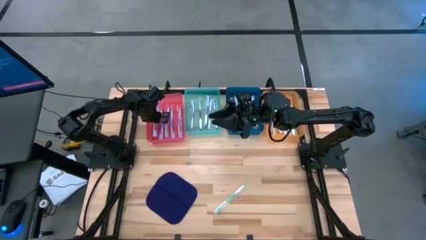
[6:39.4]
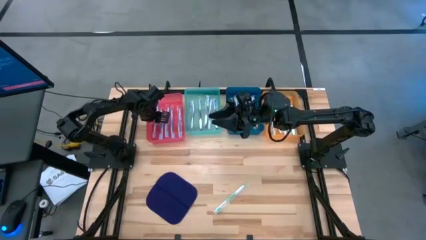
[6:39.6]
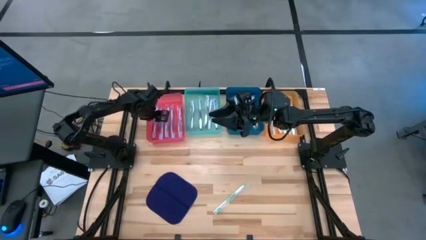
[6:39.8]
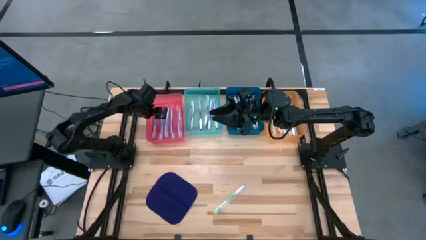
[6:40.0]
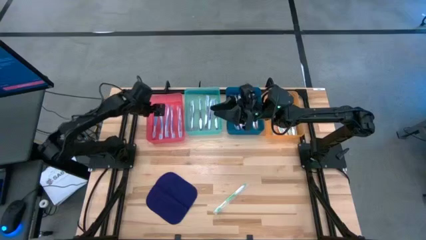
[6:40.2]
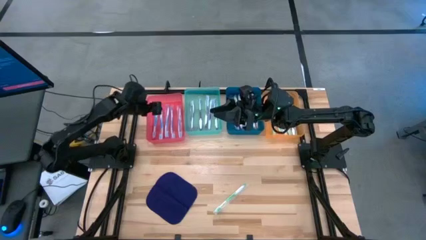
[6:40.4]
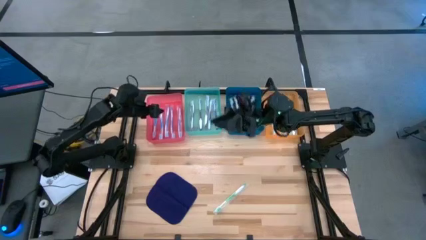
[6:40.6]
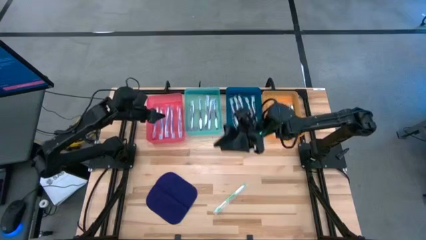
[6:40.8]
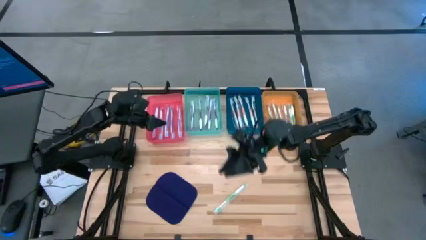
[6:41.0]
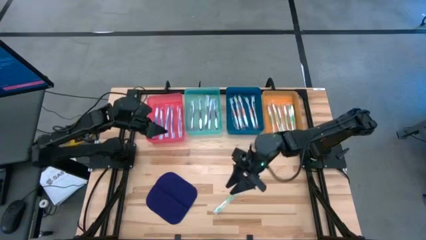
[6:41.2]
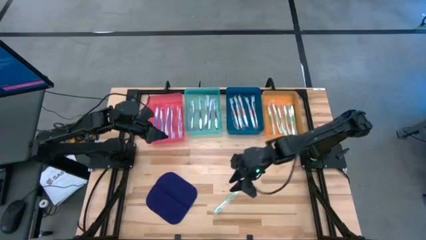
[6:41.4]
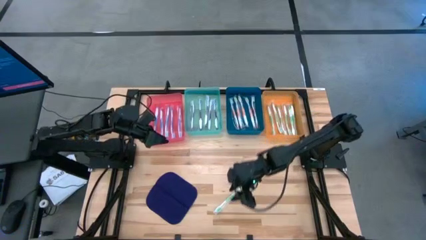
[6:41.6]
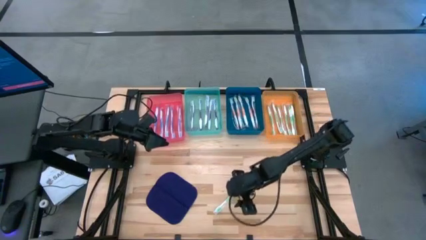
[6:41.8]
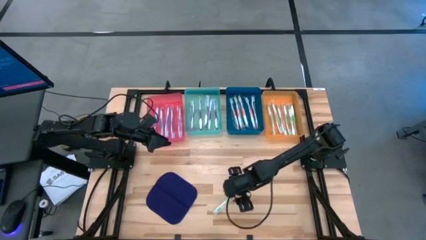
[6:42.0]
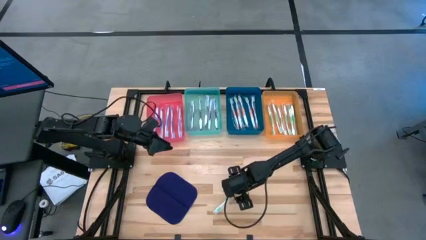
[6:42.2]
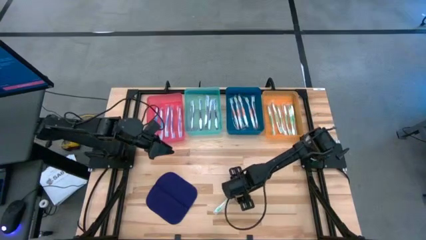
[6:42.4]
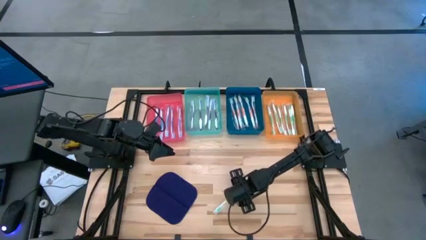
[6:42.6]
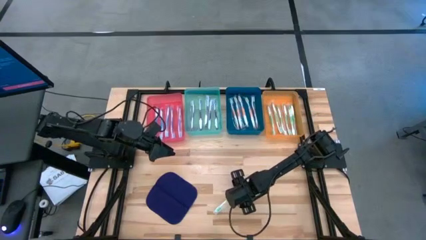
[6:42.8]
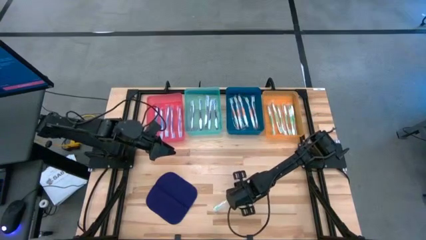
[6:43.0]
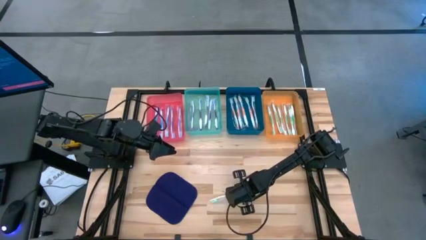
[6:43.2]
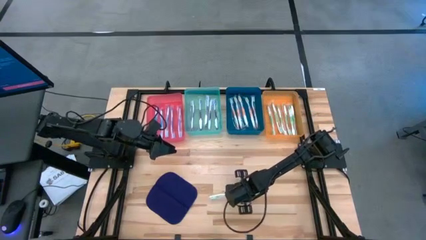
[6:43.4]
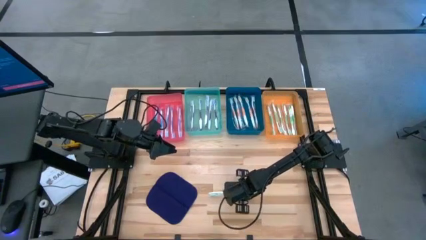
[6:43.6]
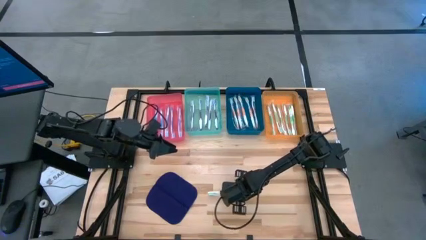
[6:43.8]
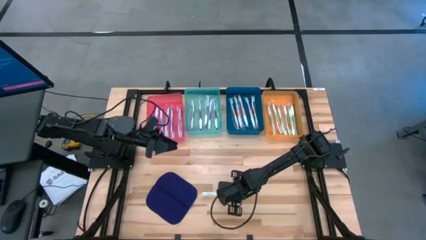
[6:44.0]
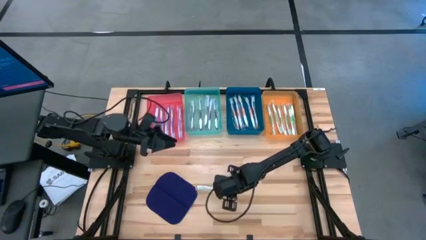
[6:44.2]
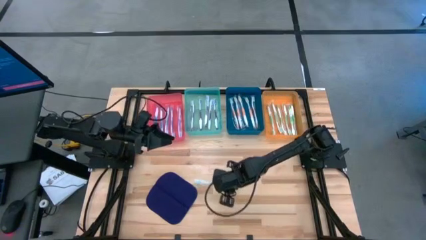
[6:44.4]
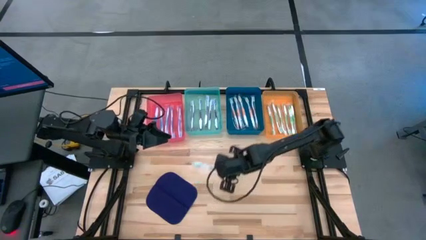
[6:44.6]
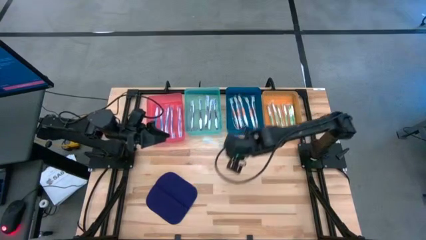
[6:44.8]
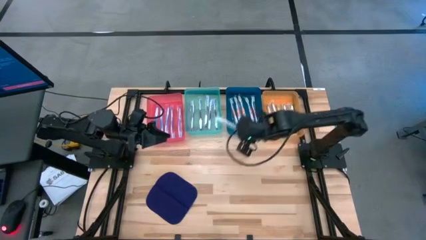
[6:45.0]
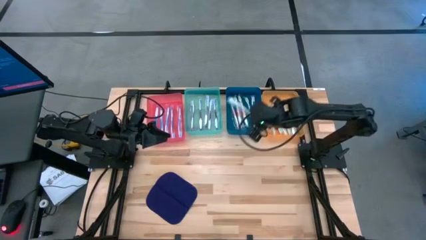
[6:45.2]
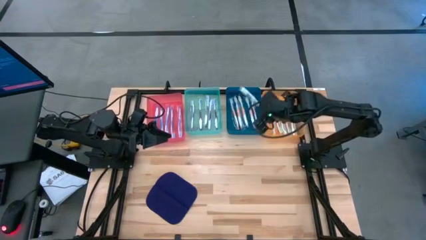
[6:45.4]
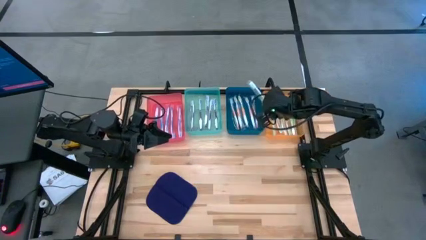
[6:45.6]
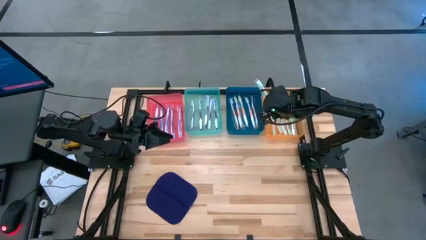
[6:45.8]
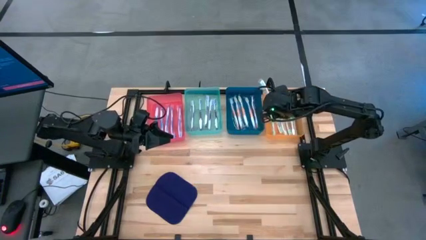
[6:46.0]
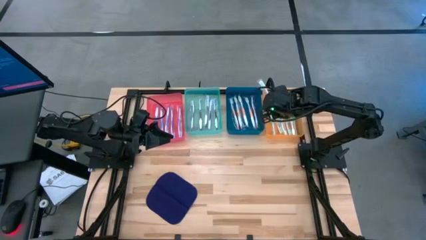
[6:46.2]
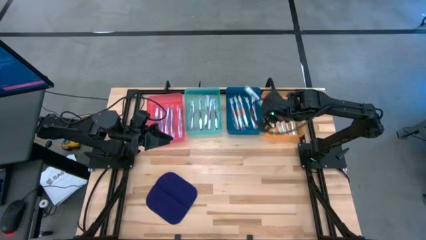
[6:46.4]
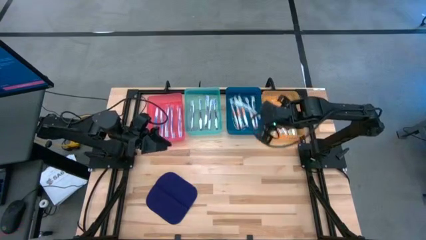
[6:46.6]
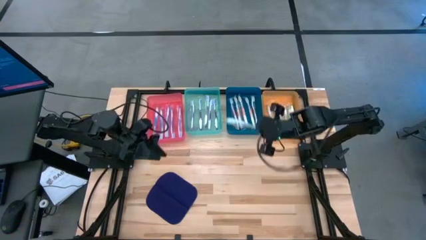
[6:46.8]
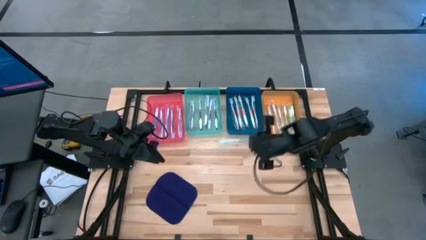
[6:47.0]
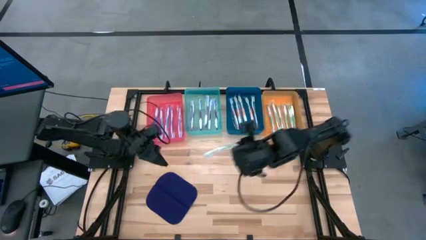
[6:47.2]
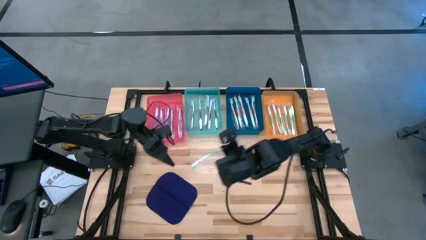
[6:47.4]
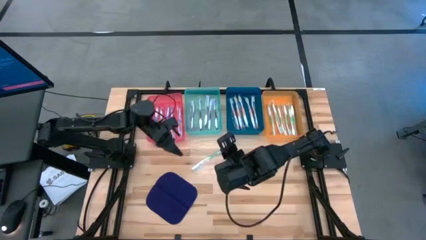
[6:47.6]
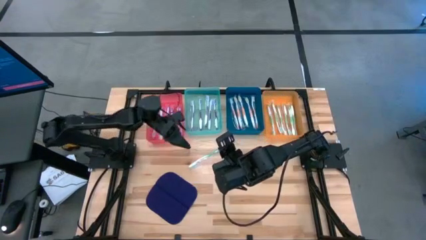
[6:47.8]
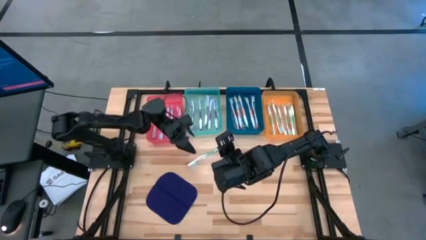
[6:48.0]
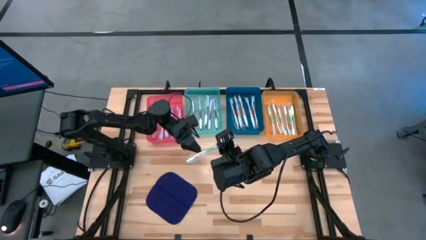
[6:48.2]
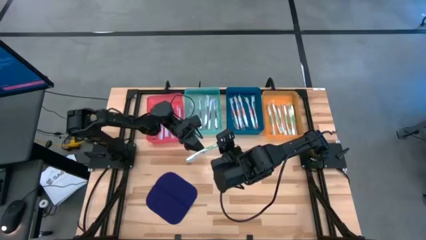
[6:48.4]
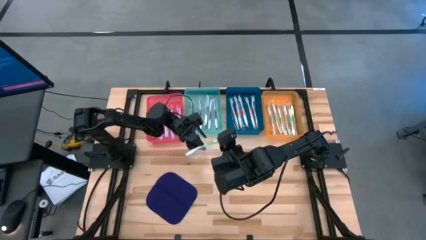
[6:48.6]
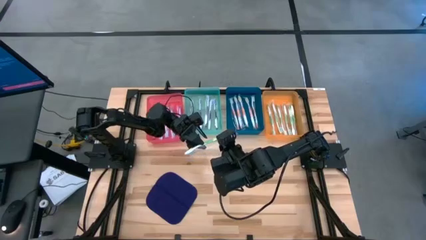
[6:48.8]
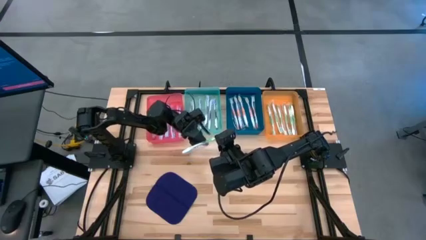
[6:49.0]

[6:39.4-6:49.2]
Task: Pick & Place Toothbrushes
Put the green toothbrush into the orange bin

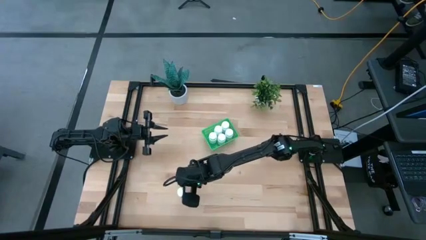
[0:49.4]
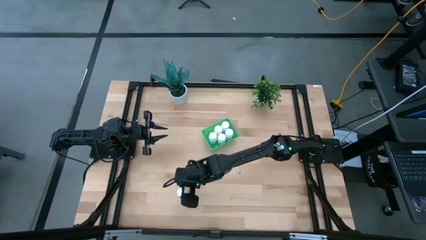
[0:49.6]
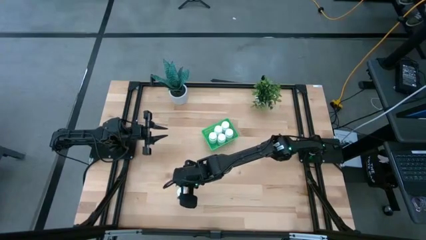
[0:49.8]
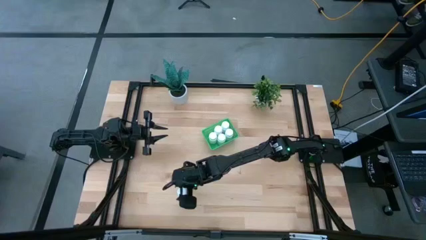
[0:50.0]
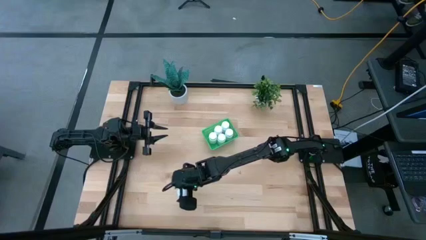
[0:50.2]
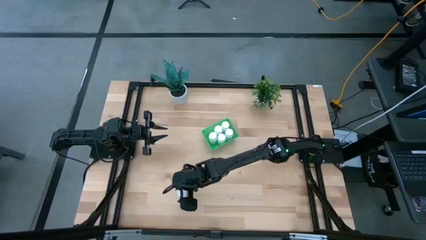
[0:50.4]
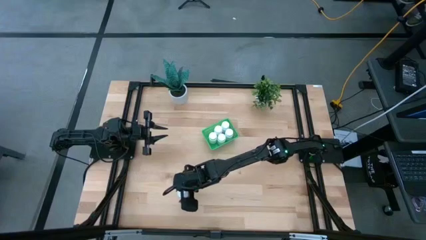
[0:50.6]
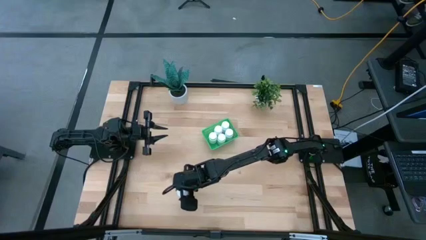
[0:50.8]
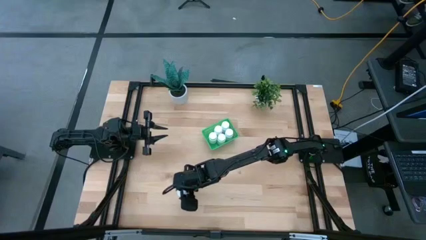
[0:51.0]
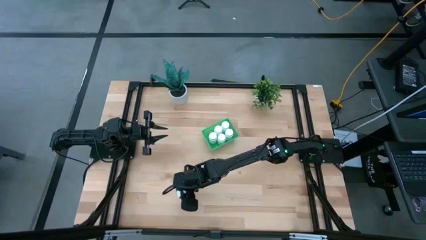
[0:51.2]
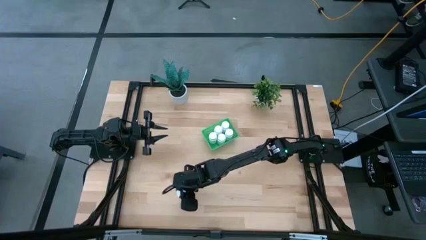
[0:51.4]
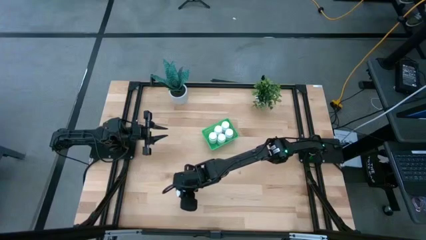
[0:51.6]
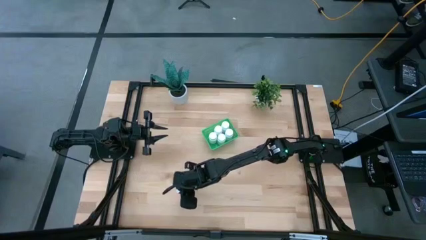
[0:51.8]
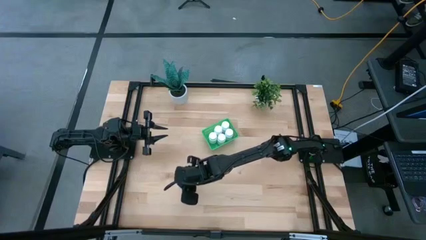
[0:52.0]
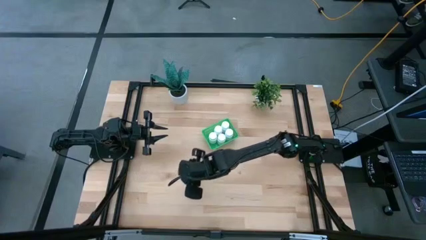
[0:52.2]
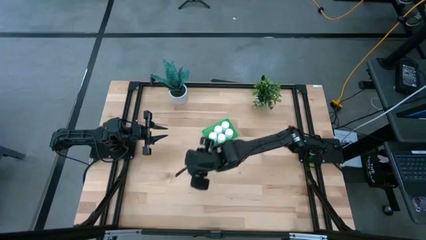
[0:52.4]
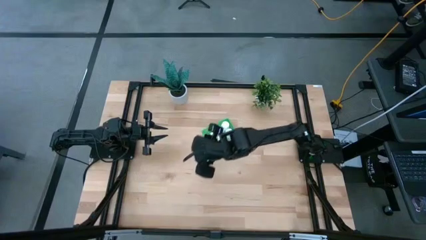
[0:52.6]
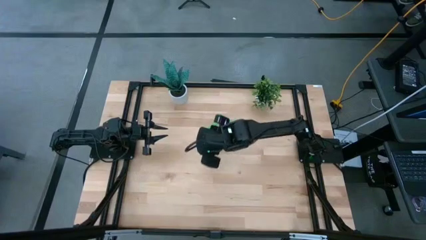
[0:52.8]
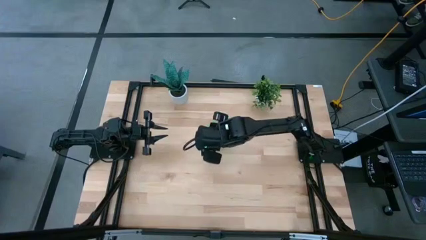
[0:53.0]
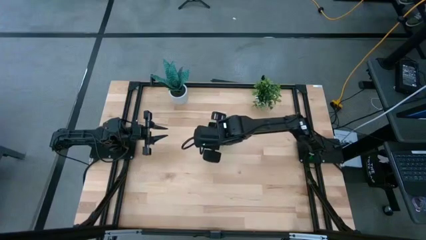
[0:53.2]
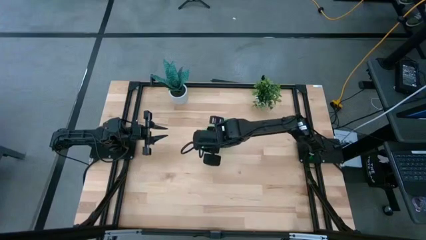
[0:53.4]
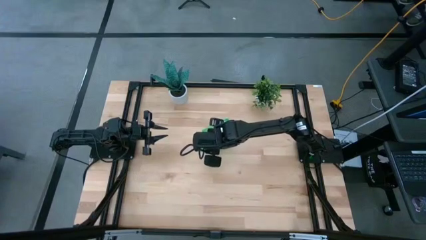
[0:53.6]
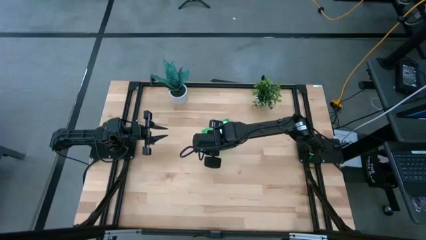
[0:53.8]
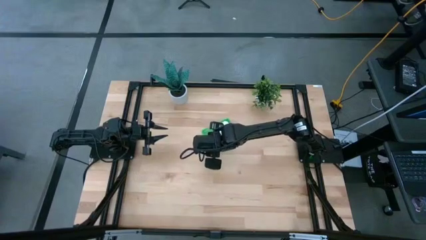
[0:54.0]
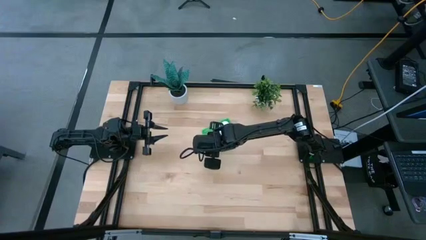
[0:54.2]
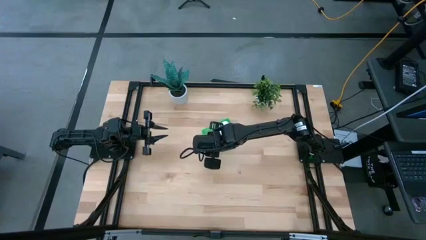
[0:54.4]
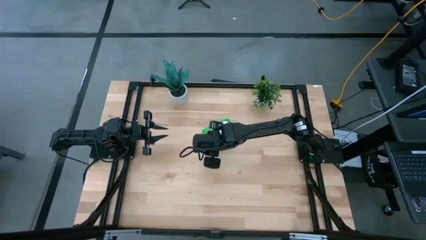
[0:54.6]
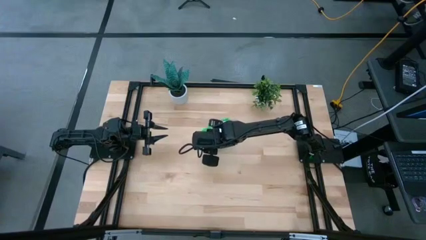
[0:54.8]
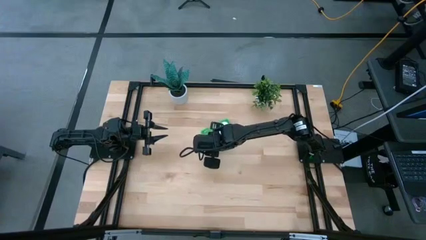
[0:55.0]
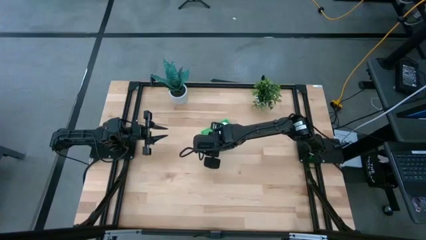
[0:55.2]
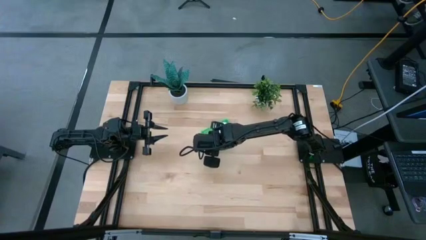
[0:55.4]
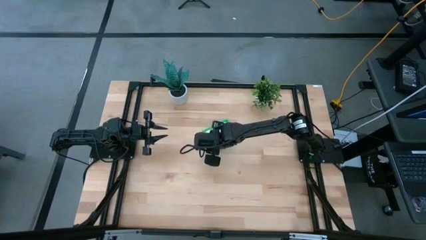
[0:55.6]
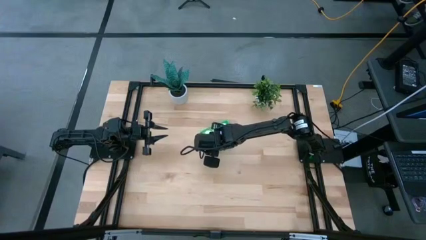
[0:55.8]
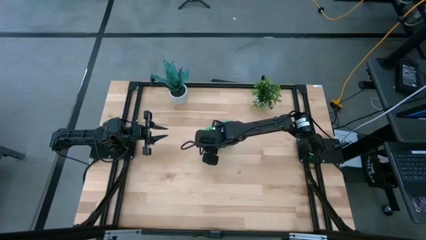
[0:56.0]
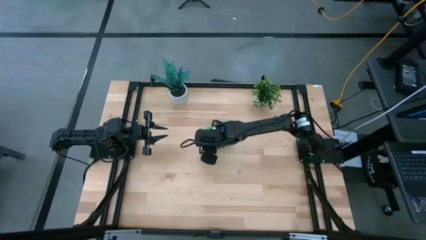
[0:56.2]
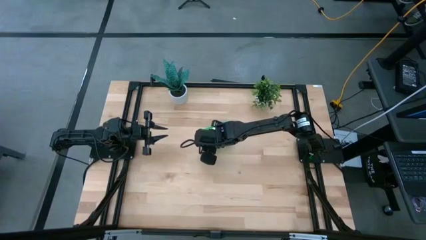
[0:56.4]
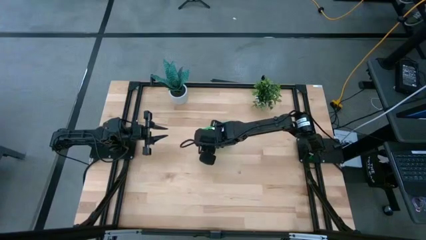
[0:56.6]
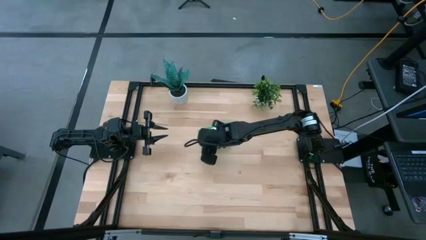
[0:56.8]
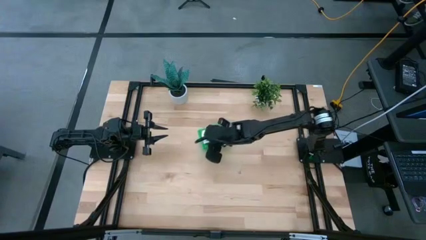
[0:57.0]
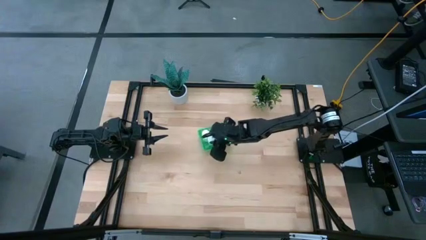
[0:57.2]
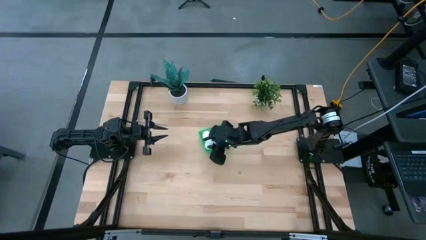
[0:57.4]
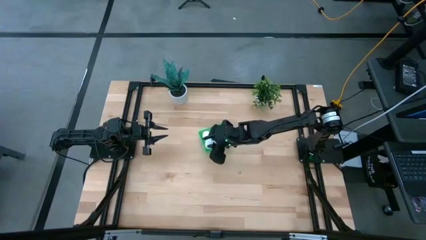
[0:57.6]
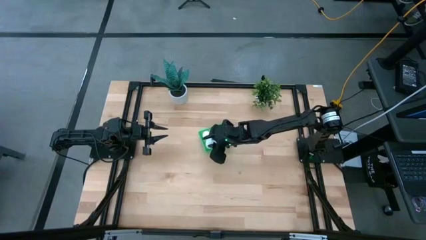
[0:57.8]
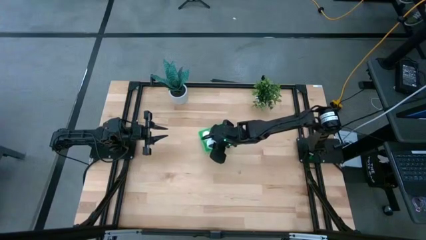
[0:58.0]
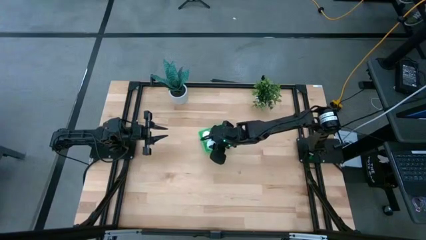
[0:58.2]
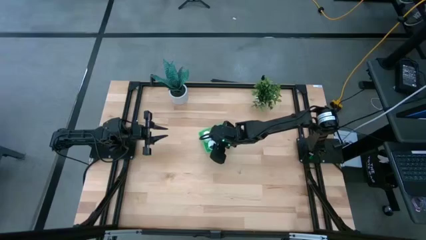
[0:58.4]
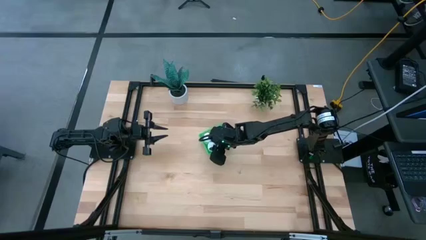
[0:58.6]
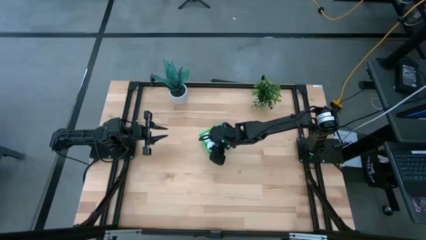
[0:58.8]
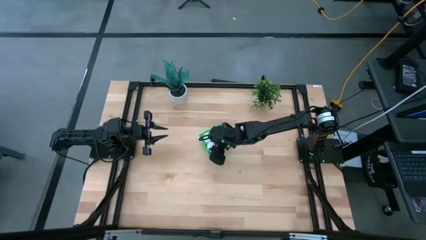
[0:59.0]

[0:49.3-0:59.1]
Task: Pick and place pill bottles into a basket
Put the white pill bottle into the green basket
